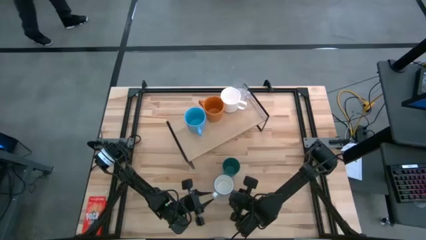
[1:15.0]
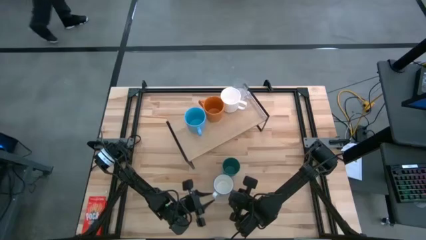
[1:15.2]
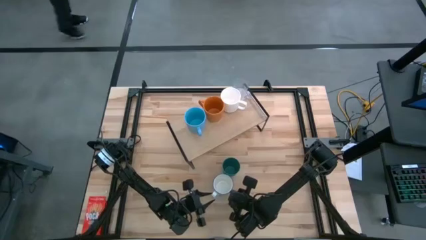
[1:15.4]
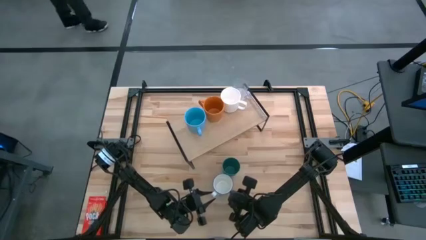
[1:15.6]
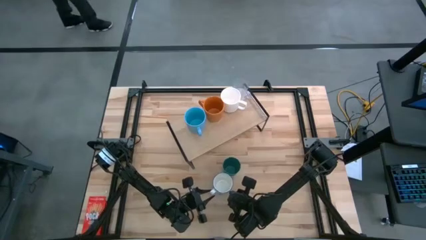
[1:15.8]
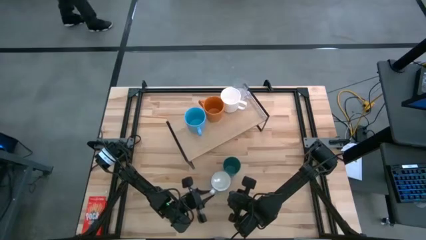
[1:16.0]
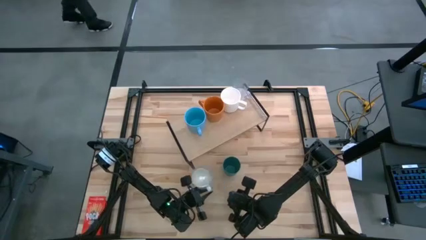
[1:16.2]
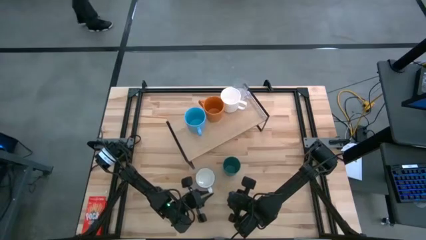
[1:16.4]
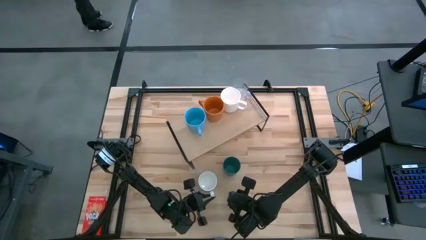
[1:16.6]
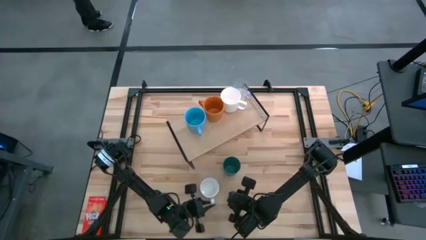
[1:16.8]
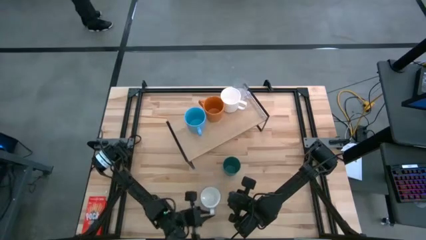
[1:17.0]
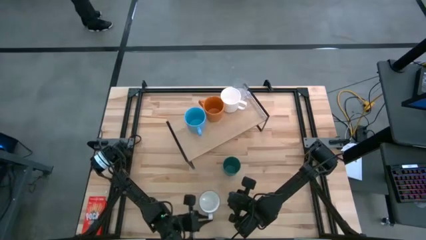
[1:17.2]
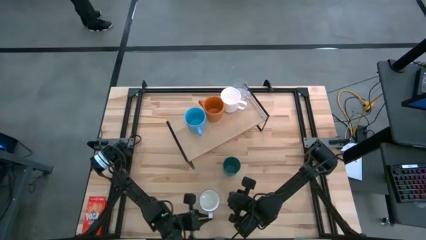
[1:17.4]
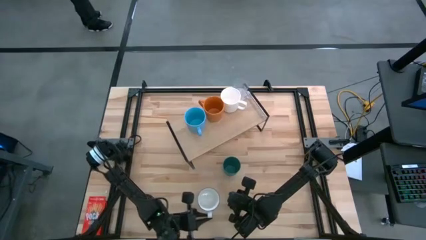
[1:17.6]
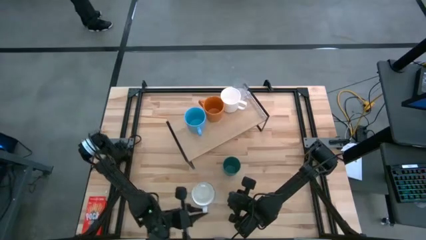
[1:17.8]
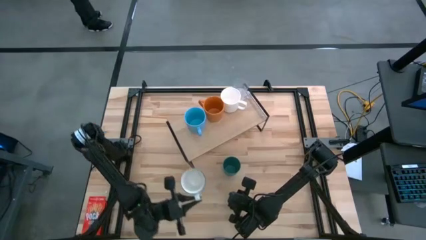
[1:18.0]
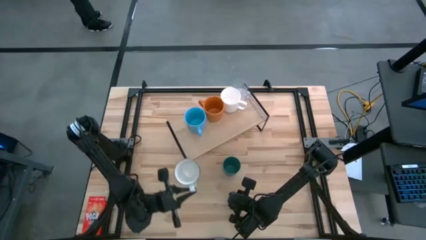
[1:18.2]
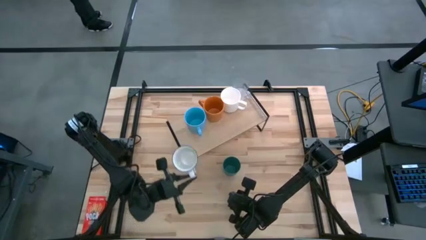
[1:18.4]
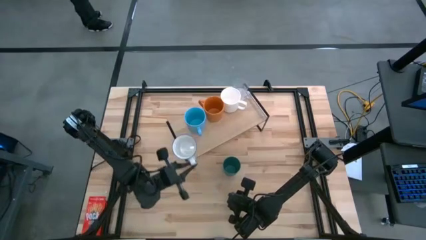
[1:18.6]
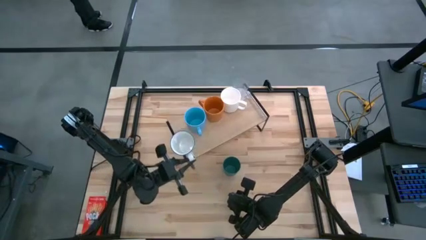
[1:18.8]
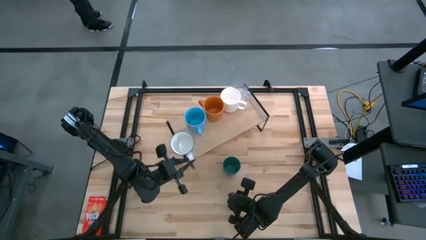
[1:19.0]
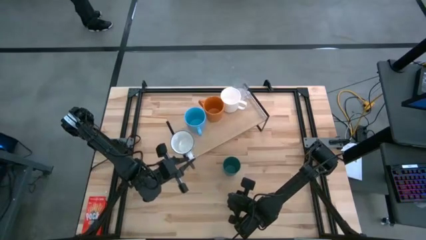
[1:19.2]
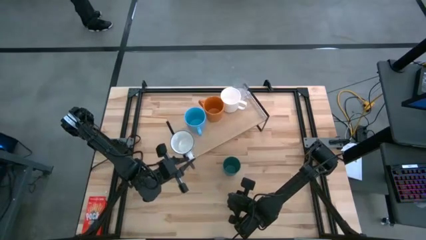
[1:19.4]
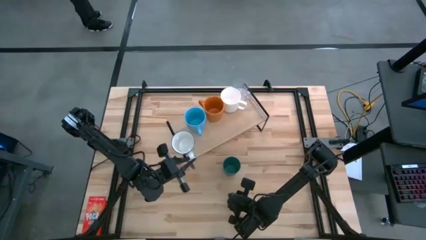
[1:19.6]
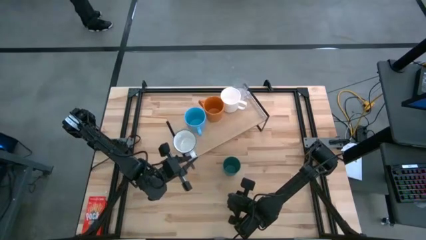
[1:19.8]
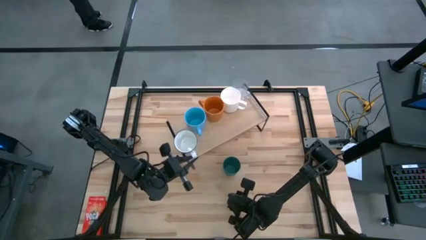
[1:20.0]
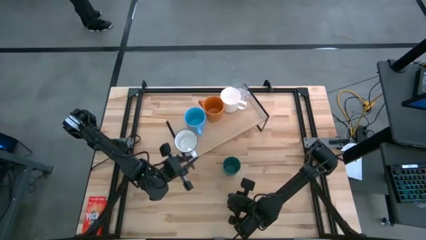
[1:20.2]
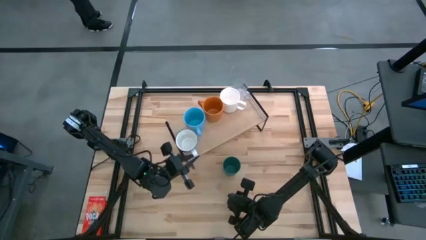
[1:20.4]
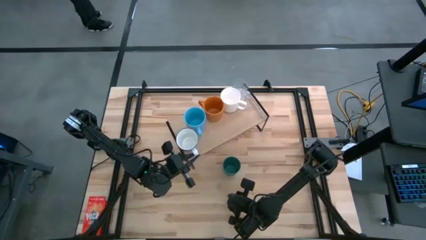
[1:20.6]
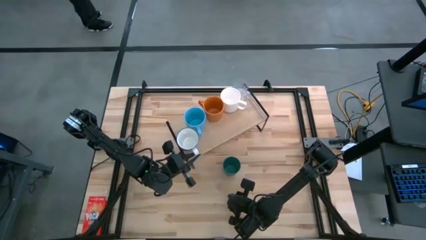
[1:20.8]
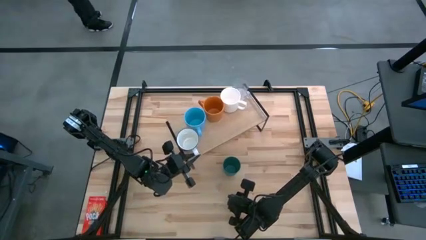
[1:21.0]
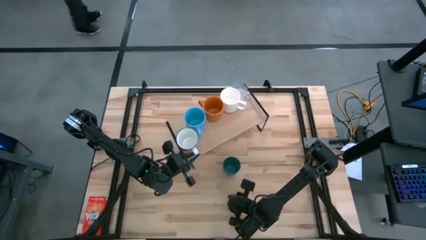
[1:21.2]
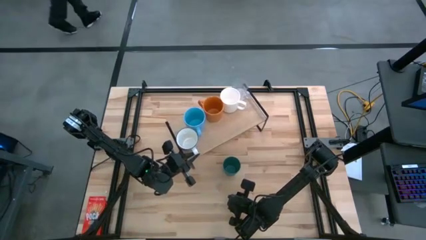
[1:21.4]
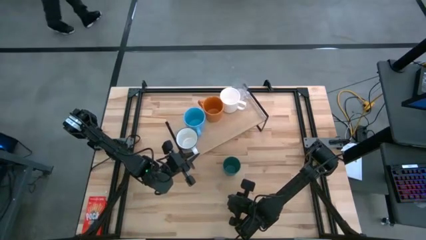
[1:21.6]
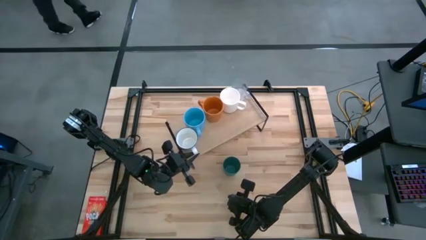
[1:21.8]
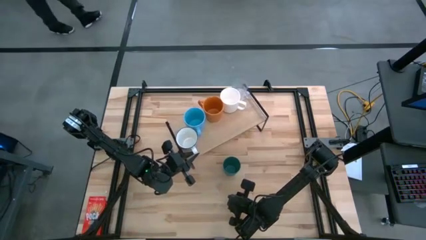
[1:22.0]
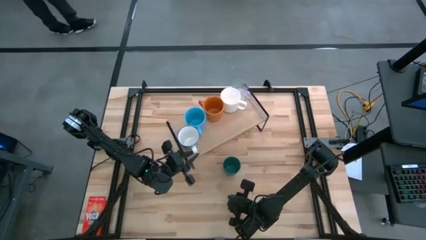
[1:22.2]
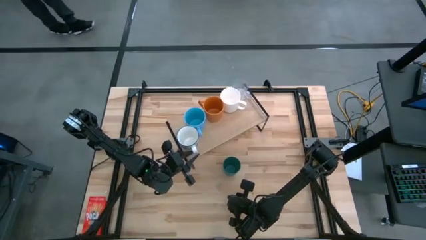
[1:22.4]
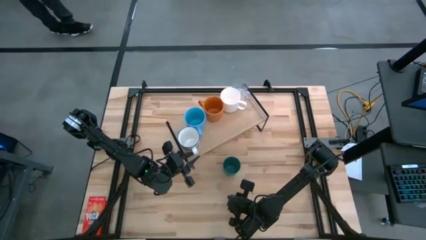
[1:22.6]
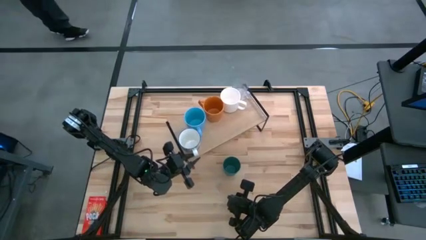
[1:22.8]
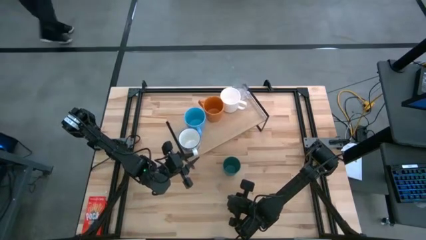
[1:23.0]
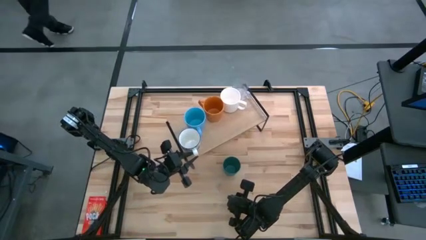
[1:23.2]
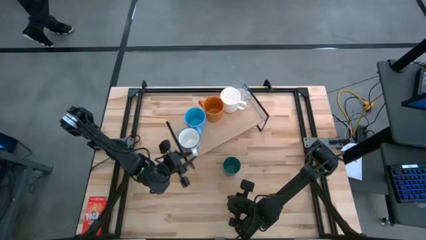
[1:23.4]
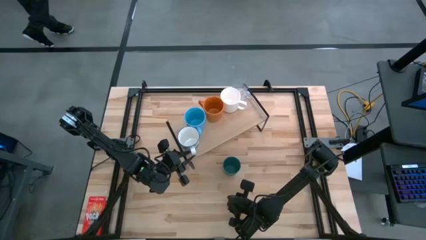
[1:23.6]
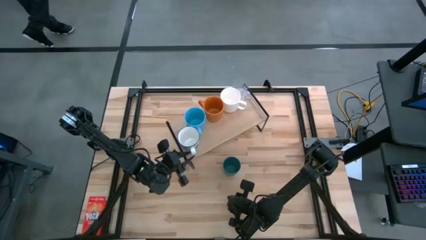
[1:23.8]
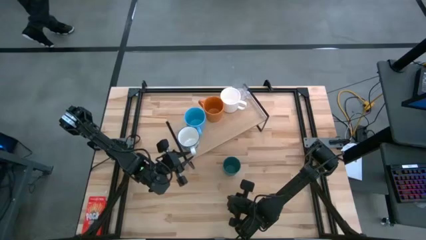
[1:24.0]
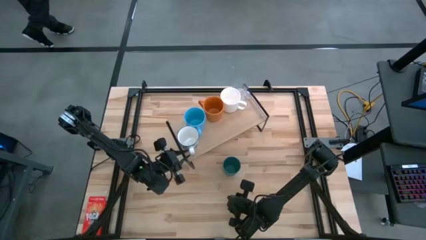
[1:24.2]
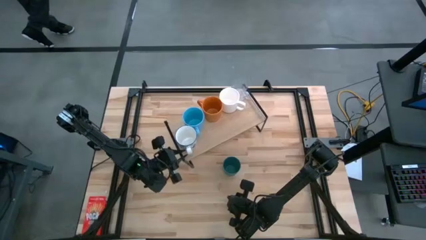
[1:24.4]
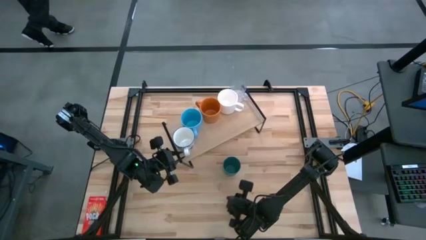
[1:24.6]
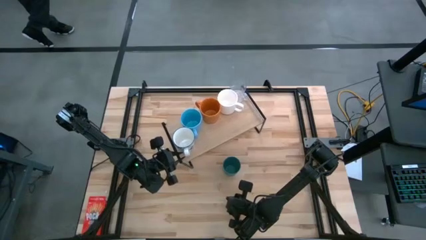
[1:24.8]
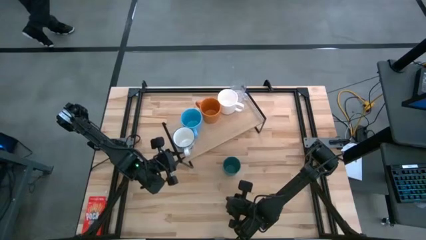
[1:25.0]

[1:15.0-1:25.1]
Task: Stack small to large cups/mugs on shelf
Put the blue patterned mug on the shelf

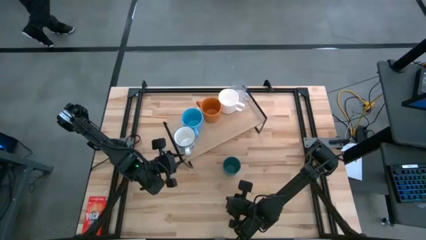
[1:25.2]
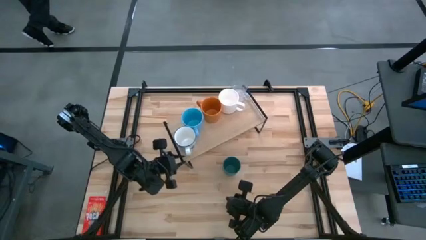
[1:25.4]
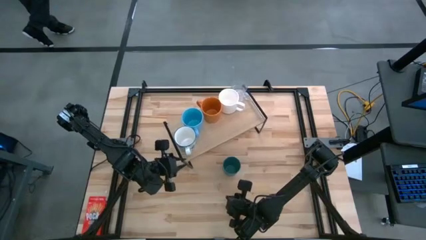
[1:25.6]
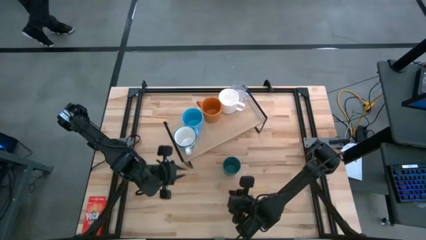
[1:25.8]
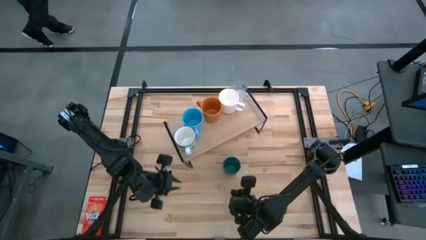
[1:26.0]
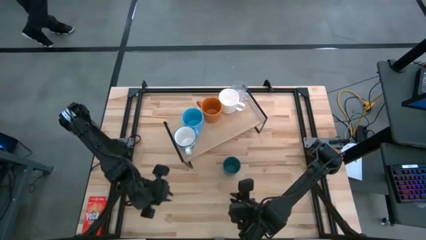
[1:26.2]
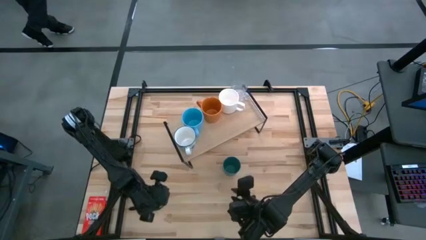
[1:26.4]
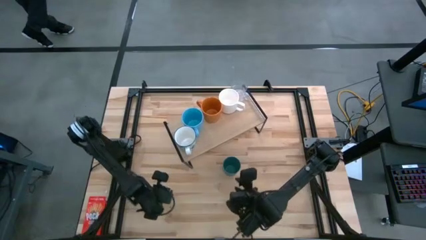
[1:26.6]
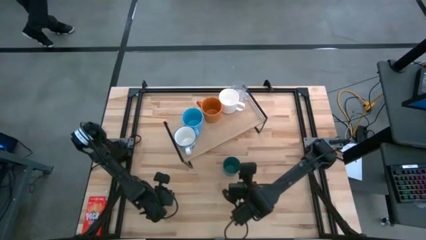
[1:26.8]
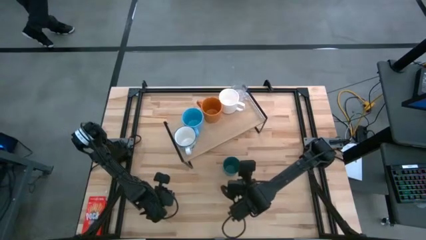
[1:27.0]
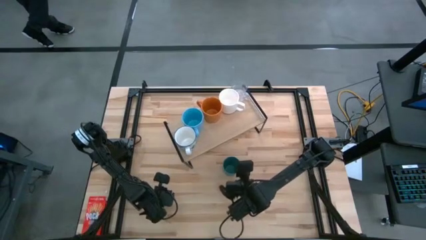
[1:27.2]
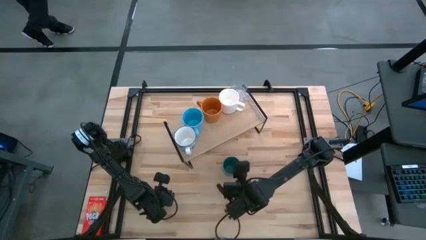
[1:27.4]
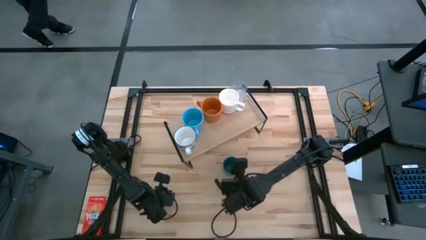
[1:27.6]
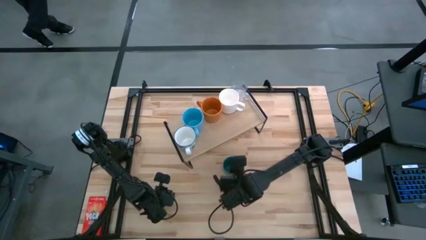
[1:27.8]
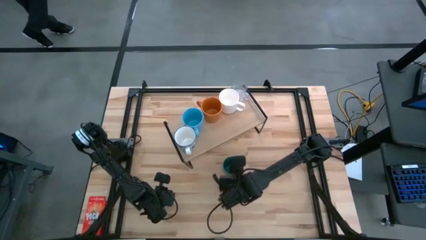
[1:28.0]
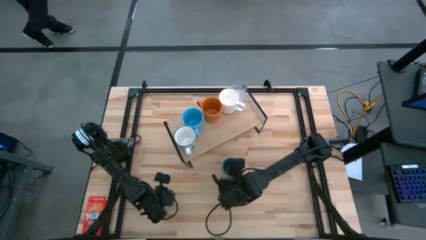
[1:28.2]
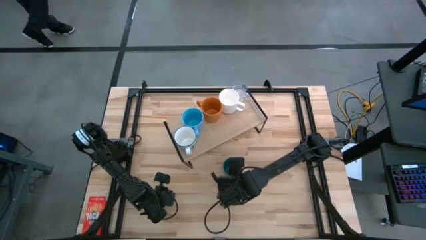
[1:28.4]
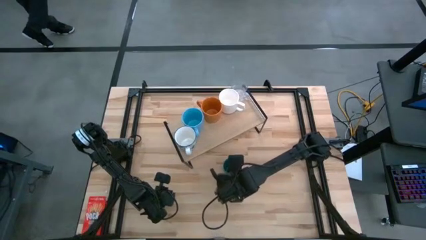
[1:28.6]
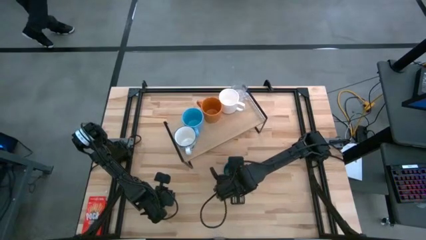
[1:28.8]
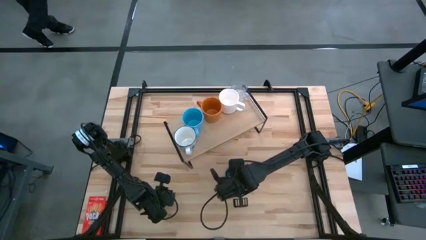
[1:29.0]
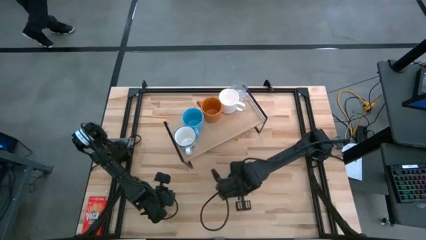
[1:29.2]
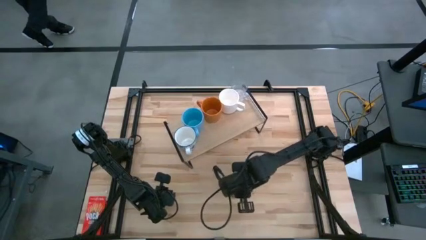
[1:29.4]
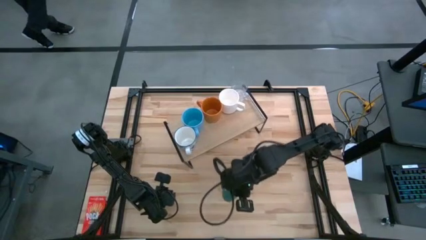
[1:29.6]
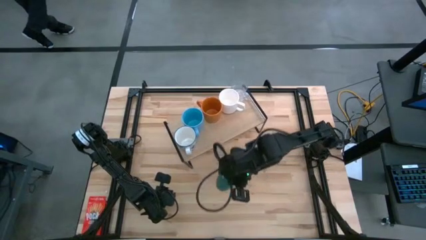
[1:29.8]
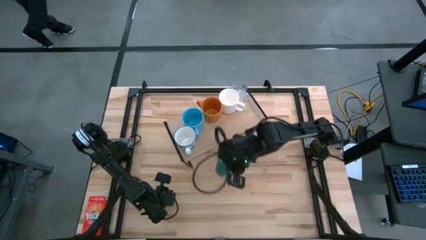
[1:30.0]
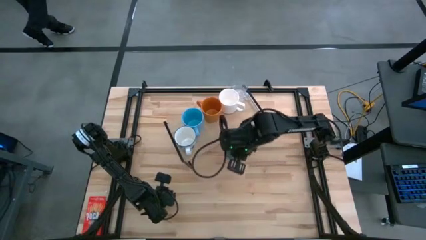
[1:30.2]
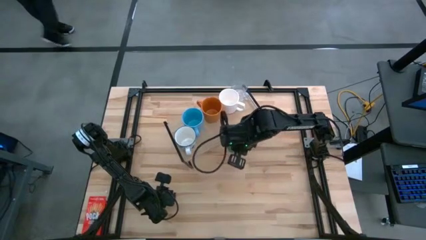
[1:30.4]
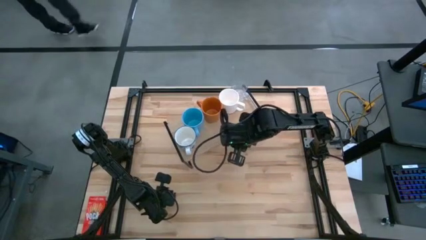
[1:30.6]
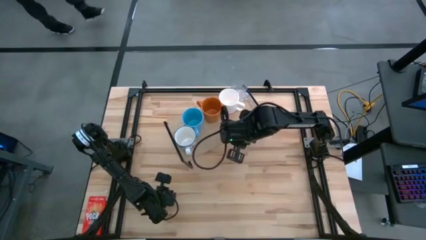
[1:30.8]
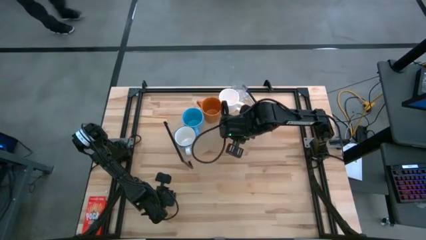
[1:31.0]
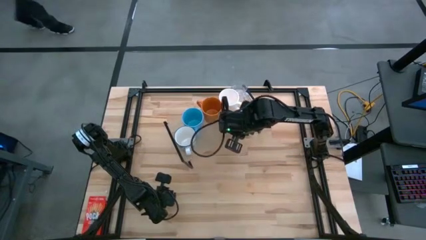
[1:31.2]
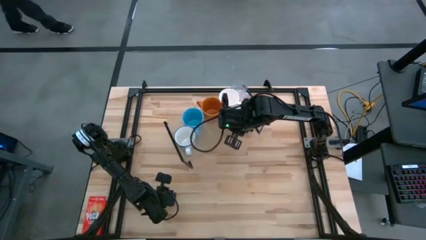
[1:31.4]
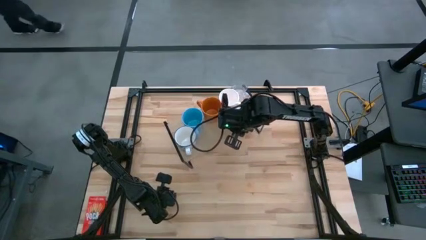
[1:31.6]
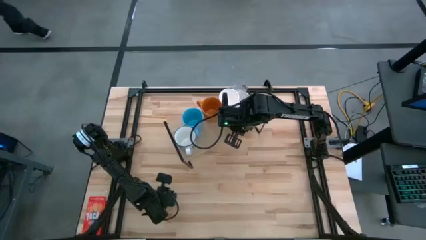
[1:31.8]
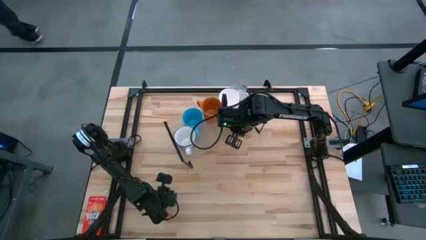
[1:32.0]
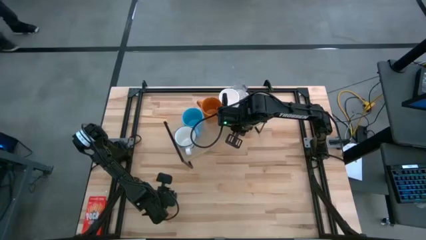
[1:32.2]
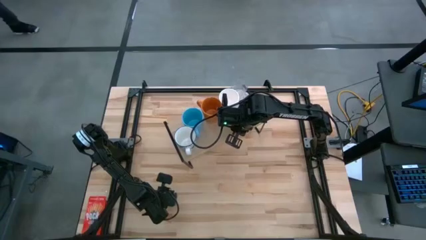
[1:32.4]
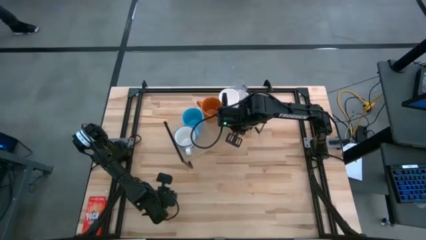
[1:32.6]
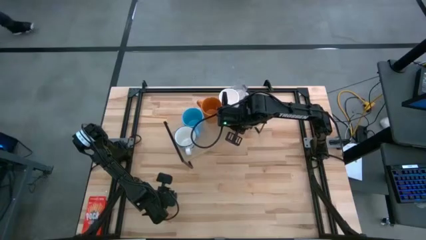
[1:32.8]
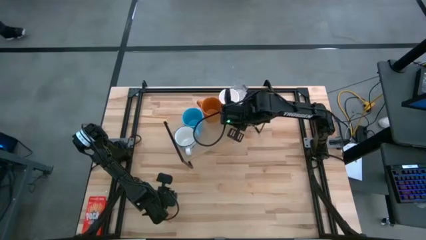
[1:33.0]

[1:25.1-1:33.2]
Put the green cup on the shelf
